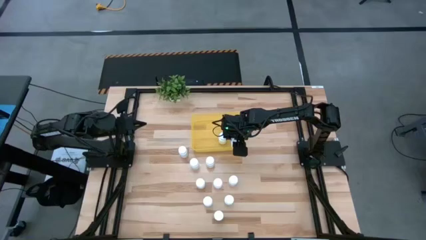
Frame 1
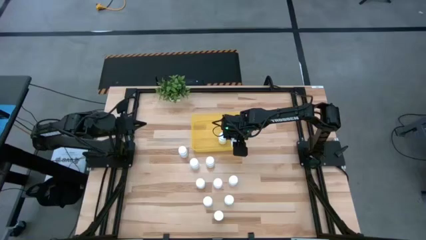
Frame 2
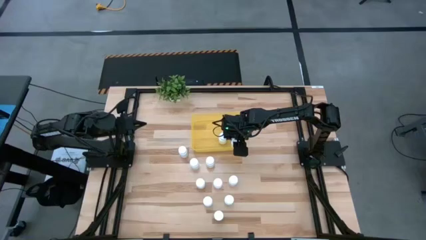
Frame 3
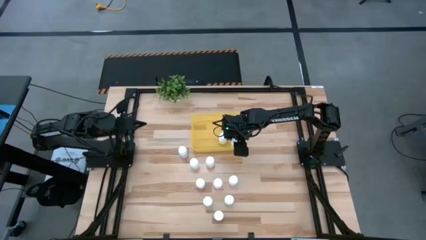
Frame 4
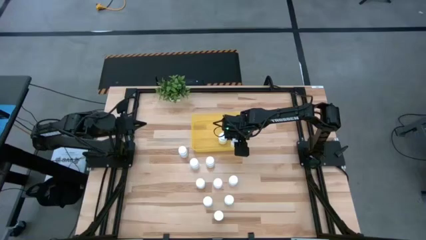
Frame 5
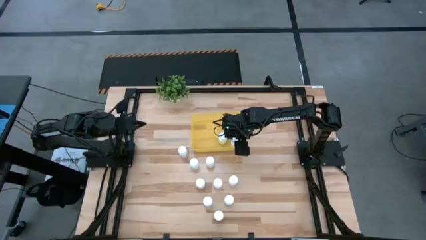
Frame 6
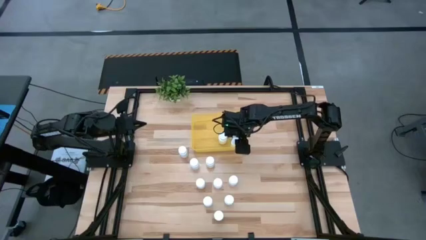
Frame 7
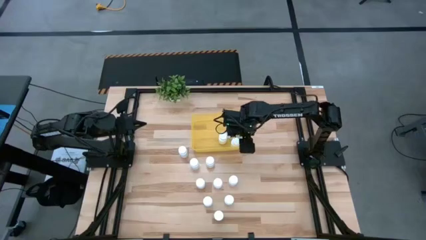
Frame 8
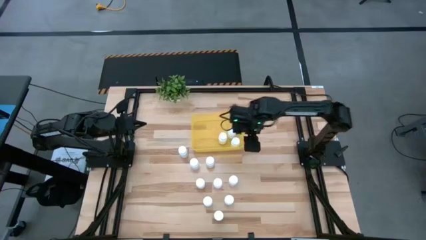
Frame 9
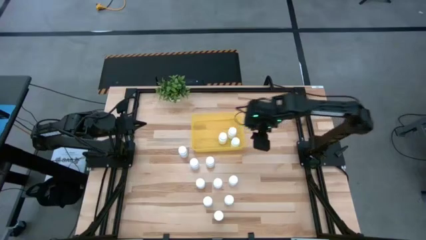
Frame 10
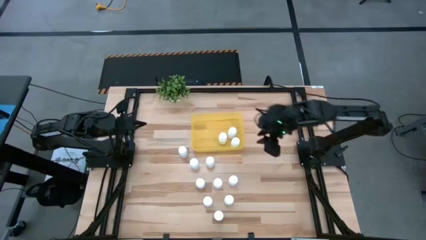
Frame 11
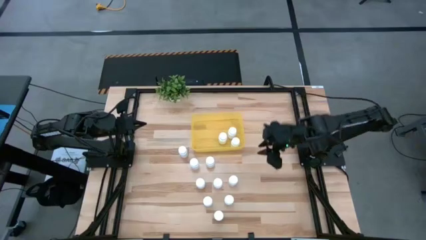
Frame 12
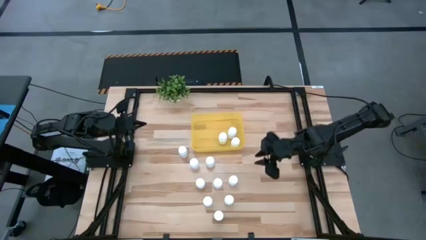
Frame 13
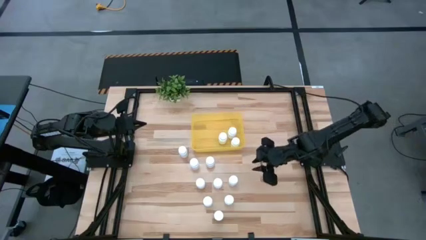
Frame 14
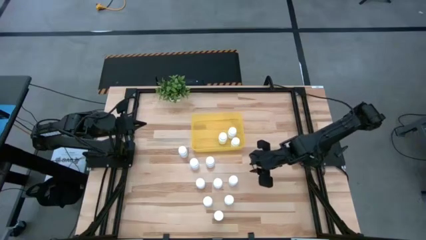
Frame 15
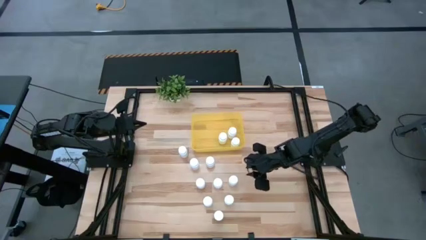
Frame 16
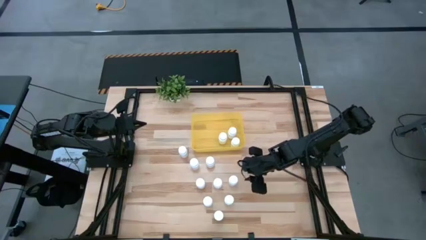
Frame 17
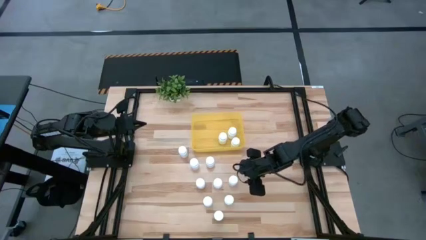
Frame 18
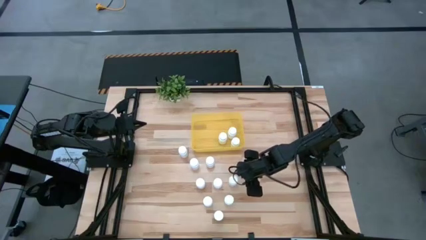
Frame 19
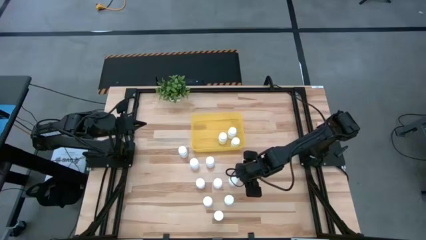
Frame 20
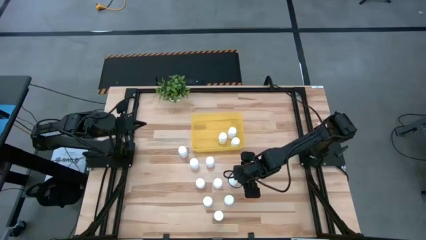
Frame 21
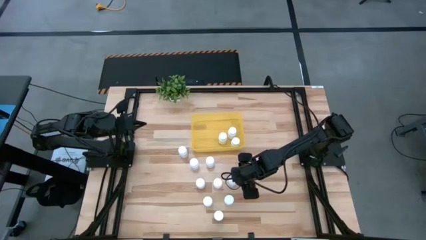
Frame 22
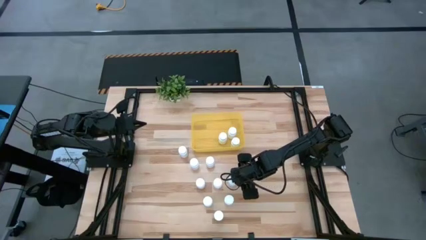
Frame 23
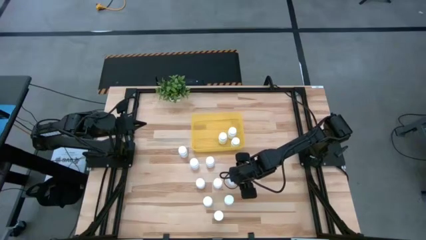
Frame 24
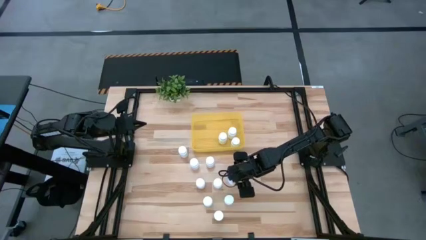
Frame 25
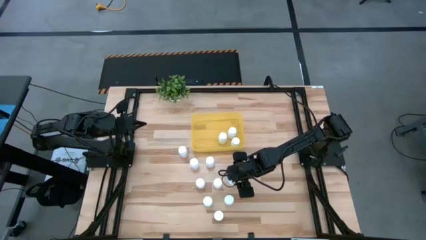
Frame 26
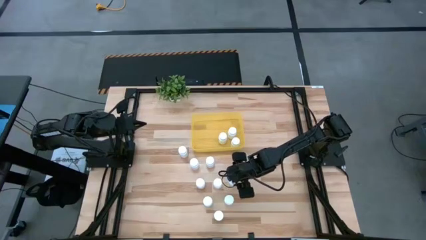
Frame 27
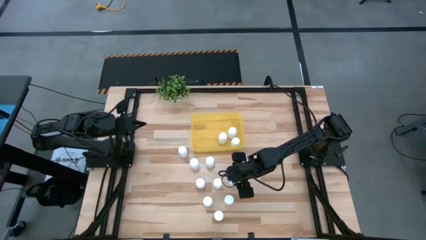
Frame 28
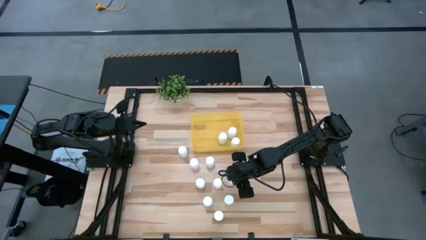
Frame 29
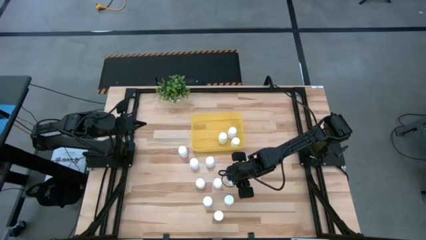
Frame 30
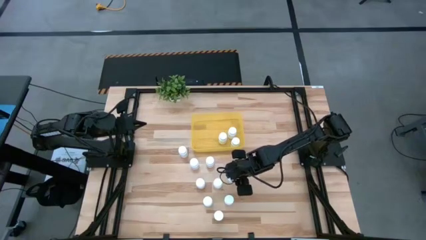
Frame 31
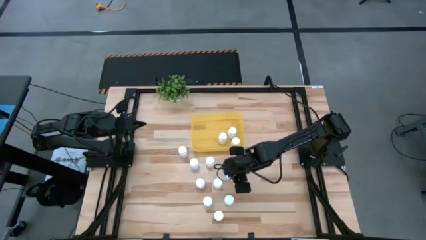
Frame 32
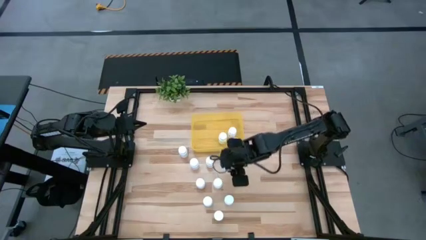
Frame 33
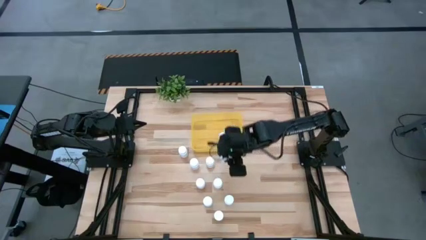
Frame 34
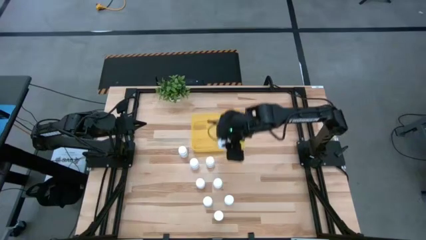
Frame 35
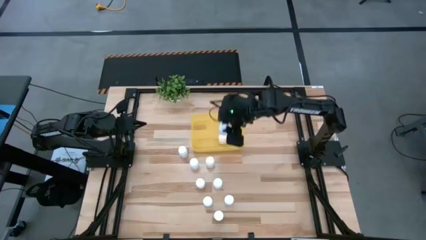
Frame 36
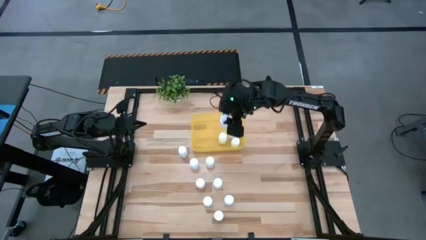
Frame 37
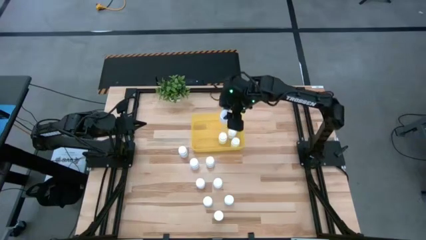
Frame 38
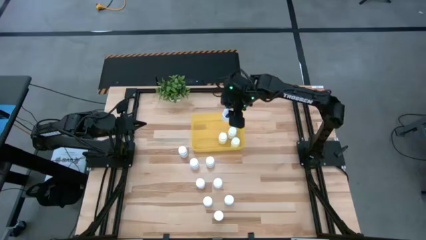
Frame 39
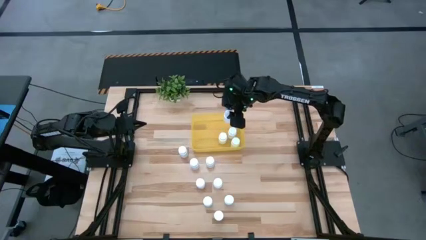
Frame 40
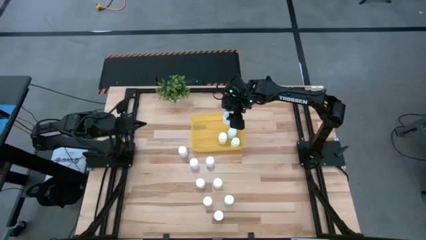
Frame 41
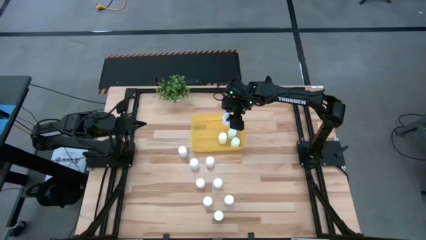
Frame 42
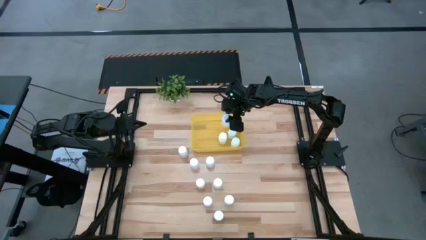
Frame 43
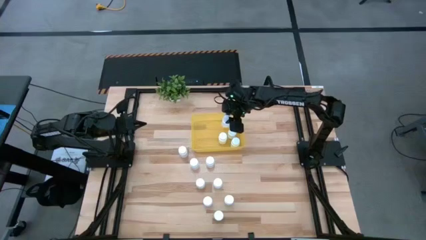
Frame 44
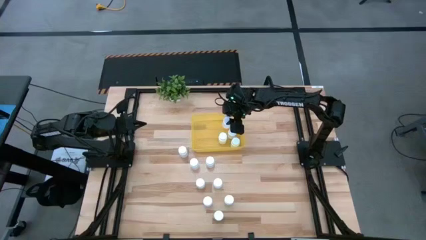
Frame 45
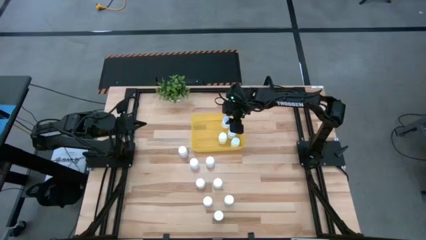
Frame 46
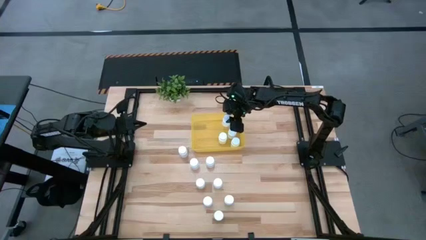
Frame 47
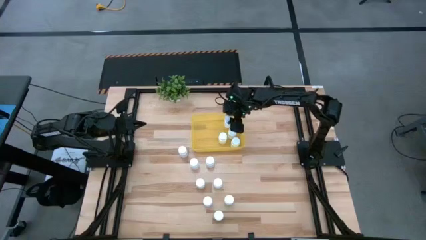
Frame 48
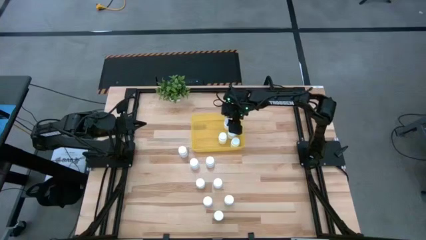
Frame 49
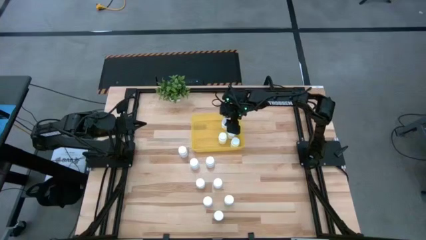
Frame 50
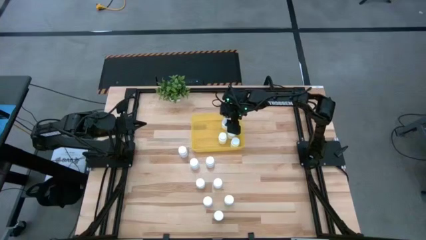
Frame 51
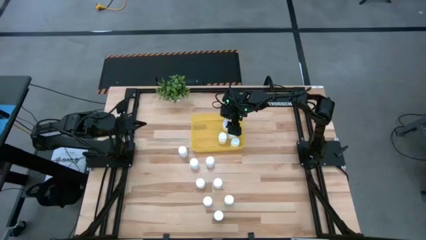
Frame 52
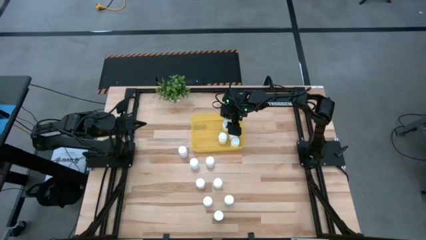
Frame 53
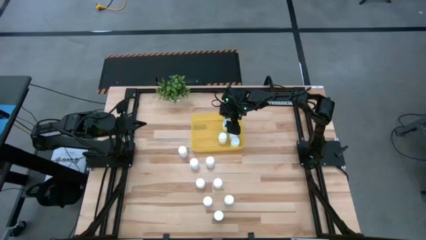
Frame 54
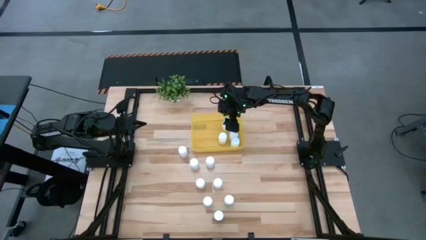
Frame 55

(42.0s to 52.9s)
Task: Pick and place pill bottles into a basket
Put the white medicine bottle into the yellow bin

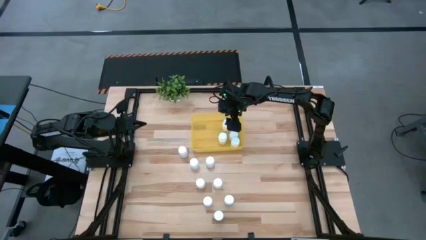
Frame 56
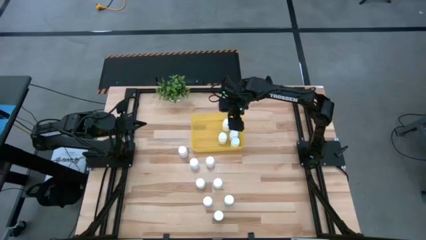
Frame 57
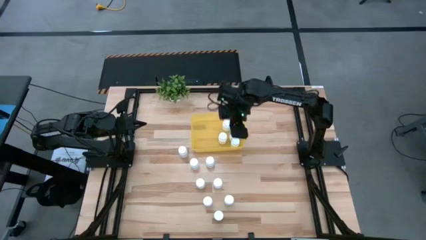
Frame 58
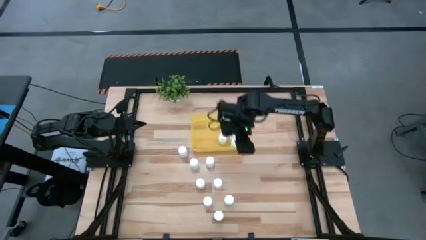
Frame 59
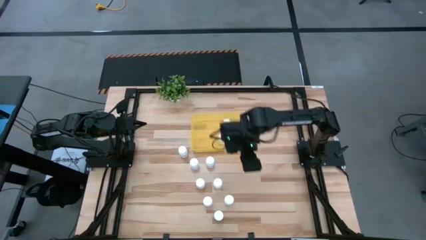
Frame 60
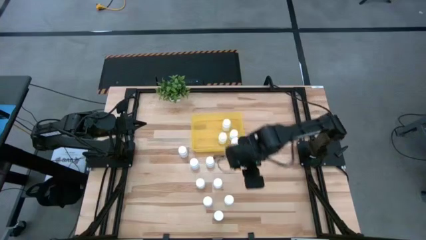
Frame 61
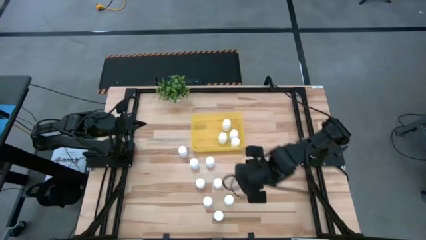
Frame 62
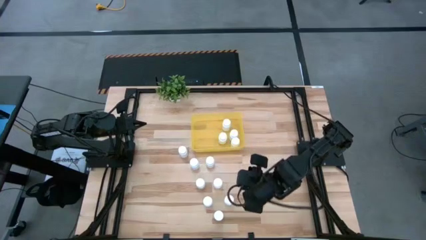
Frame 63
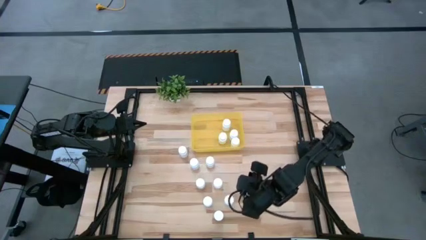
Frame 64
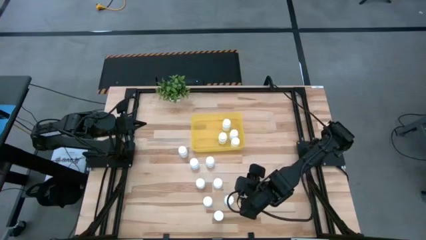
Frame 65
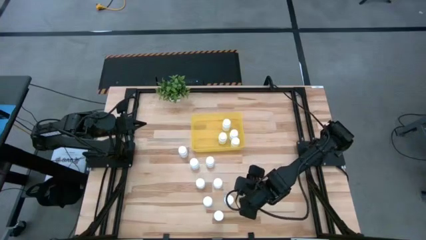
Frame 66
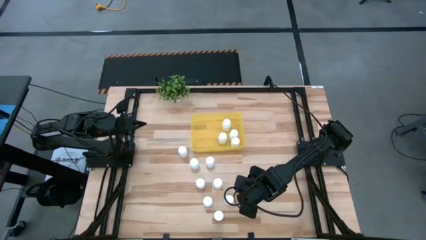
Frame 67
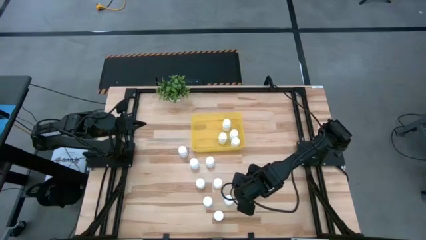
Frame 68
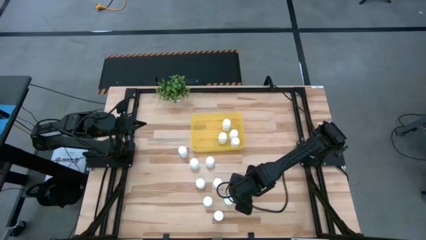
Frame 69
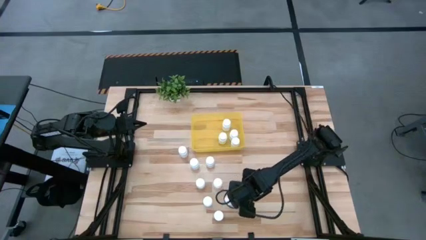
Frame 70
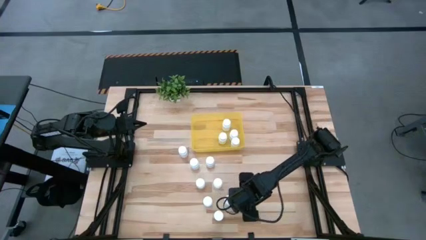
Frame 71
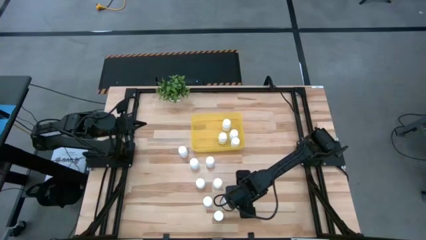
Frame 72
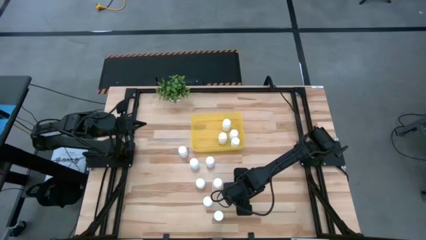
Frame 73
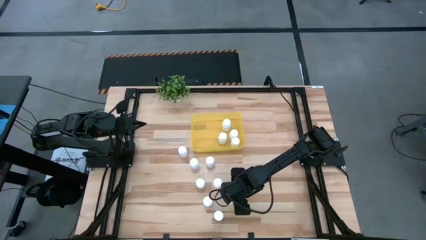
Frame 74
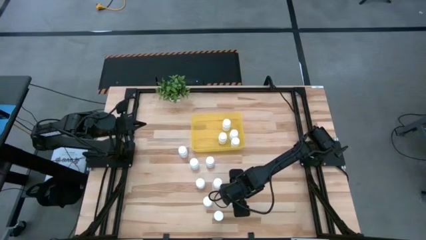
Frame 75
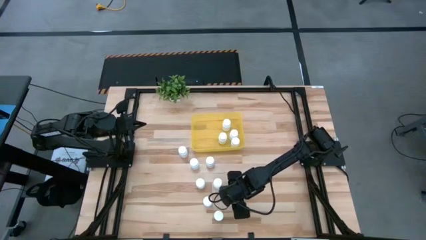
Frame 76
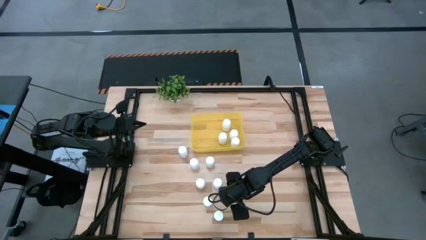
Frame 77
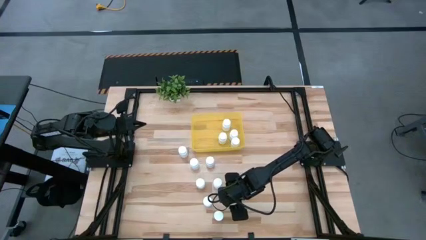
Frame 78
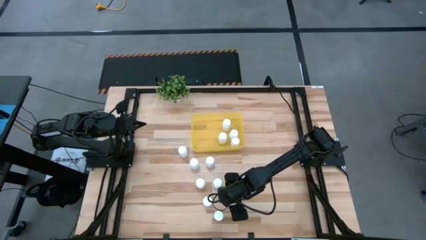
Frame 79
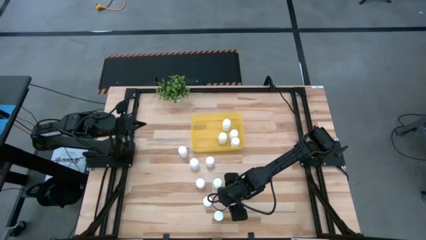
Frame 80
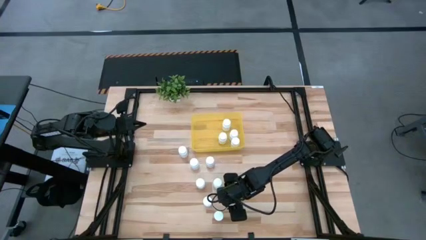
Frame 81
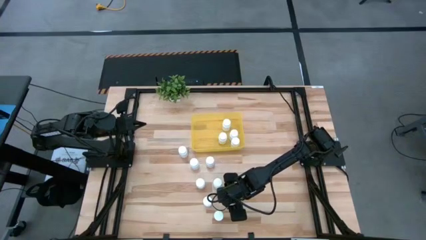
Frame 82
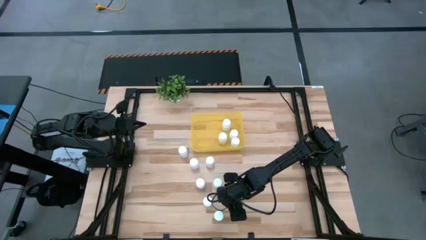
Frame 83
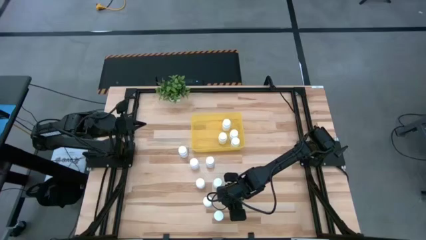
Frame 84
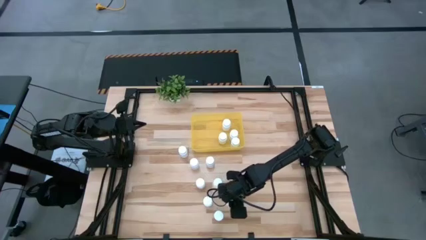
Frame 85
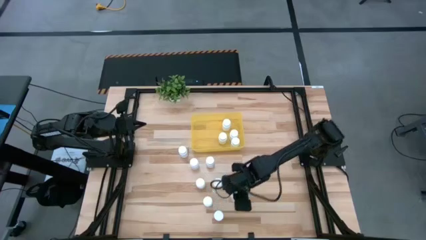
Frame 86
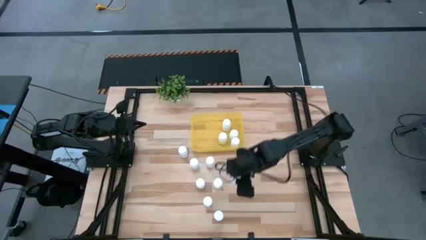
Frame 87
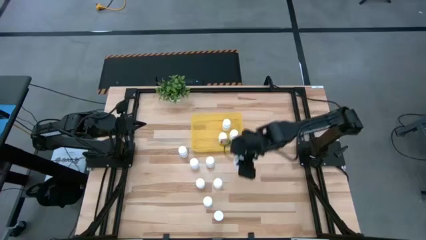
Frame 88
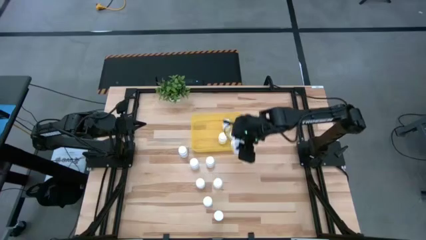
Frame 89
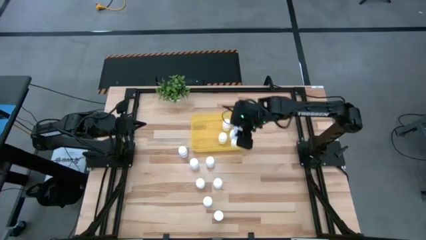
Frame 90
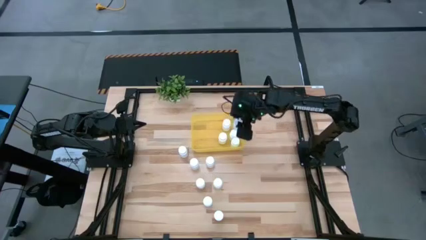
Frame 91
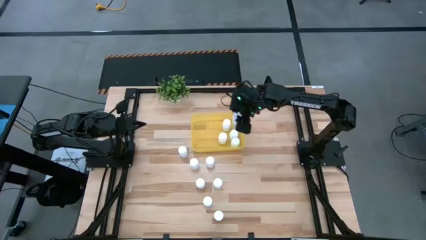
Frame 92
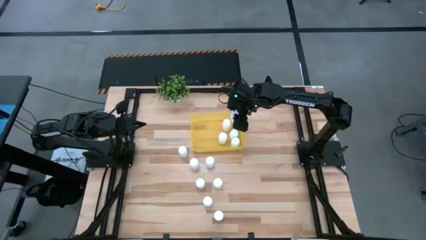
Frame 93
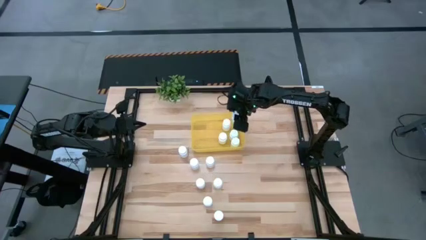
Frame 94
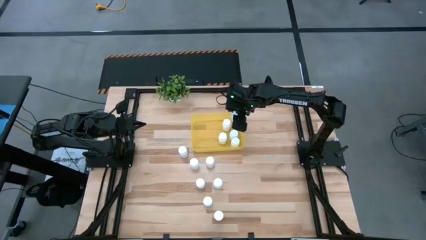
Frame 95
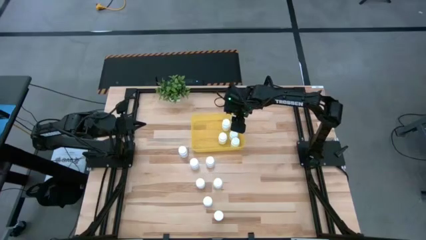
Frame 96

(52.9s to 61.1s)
Put the white medicine bottle into the yellow bin
